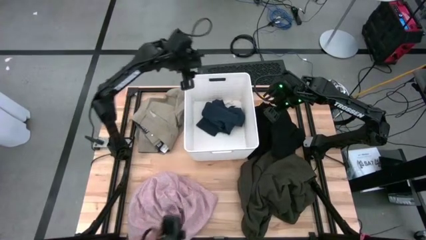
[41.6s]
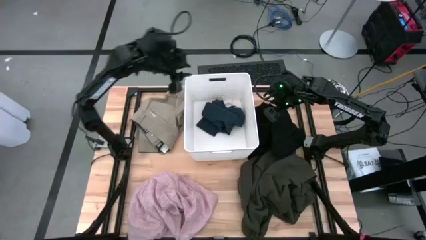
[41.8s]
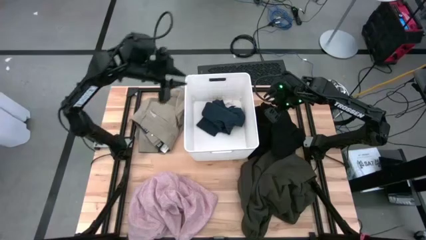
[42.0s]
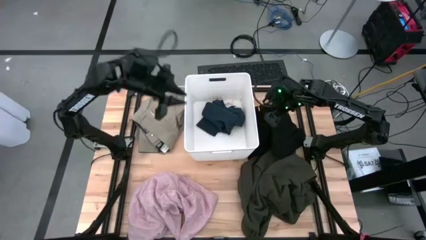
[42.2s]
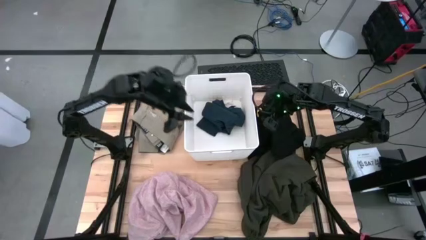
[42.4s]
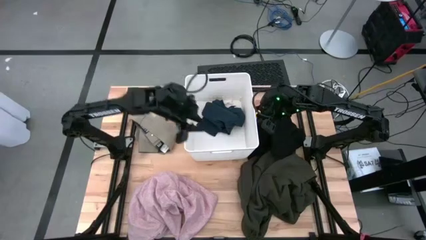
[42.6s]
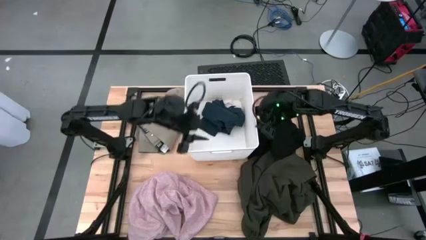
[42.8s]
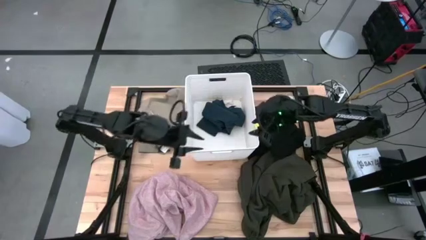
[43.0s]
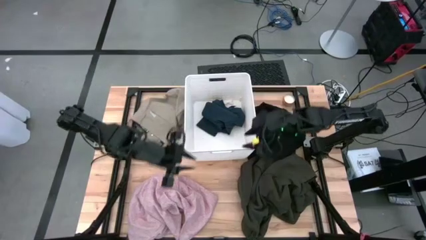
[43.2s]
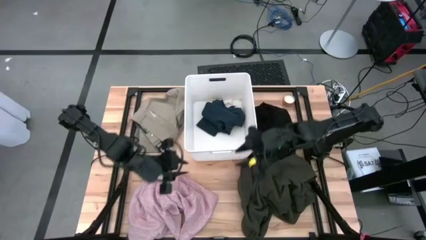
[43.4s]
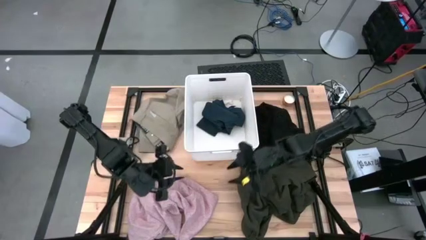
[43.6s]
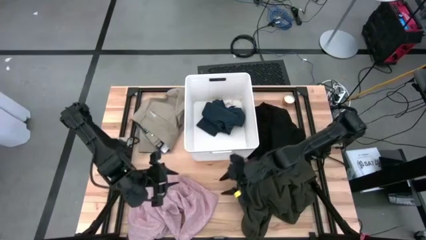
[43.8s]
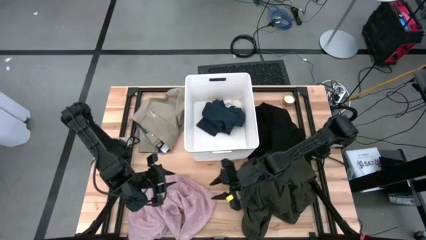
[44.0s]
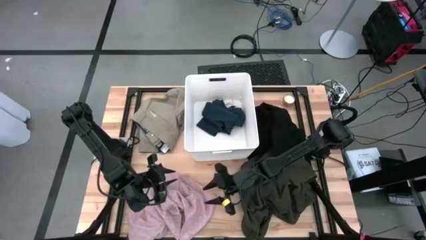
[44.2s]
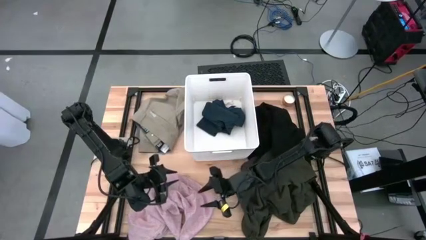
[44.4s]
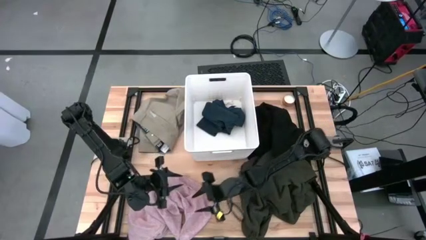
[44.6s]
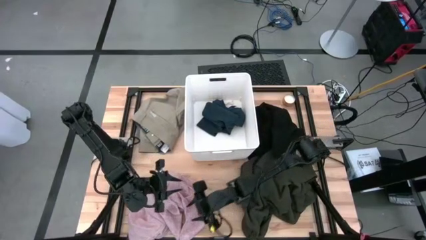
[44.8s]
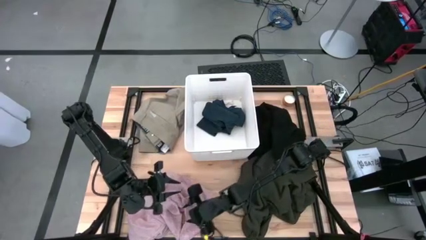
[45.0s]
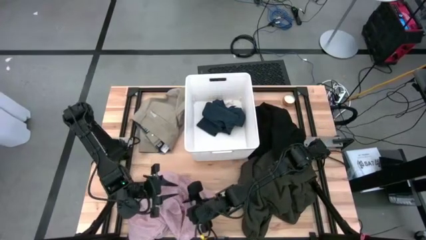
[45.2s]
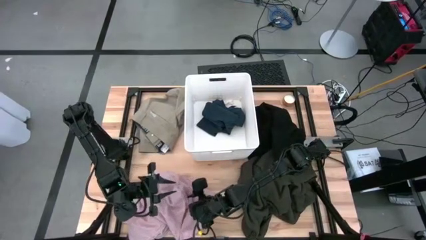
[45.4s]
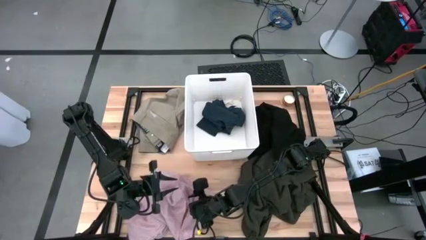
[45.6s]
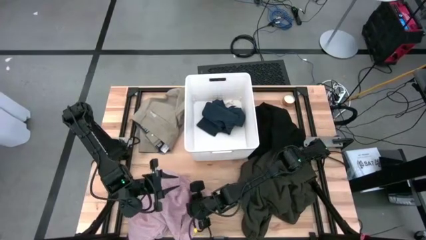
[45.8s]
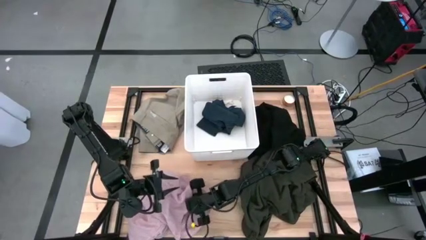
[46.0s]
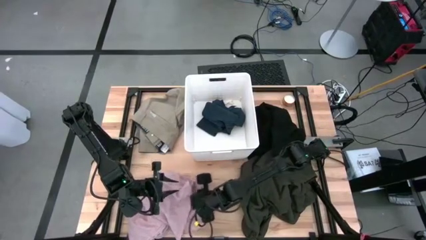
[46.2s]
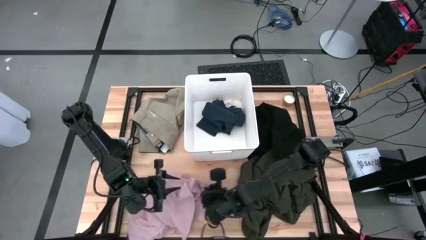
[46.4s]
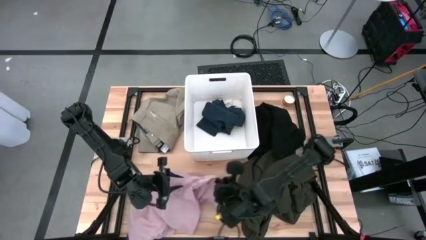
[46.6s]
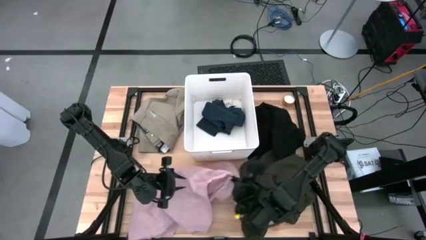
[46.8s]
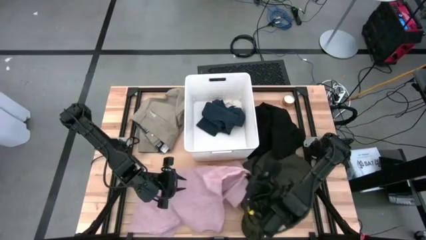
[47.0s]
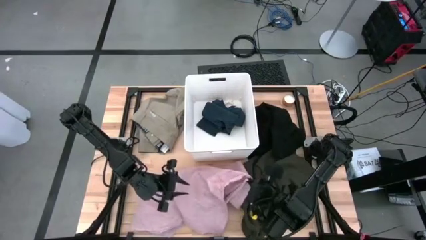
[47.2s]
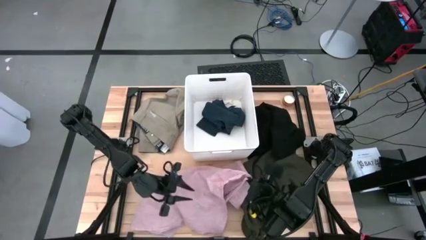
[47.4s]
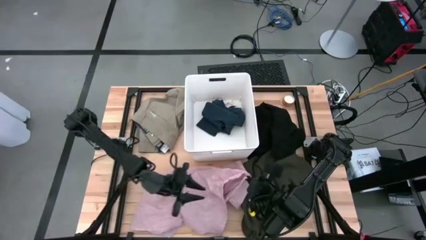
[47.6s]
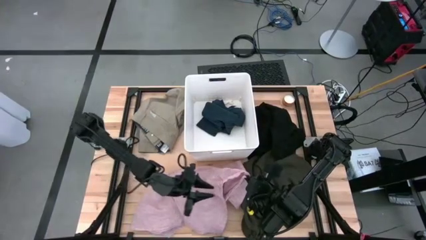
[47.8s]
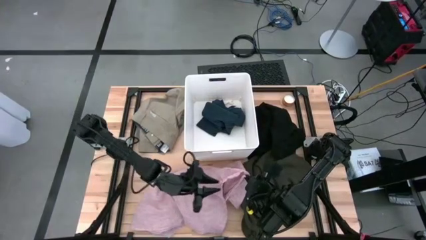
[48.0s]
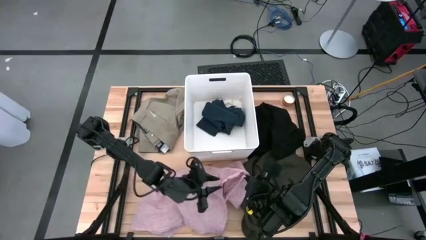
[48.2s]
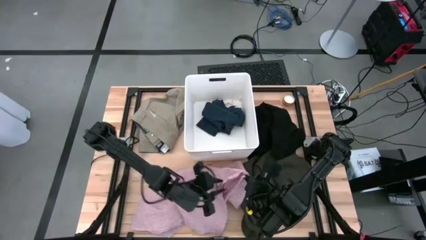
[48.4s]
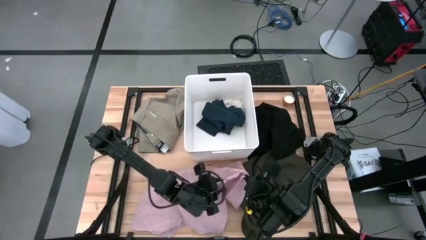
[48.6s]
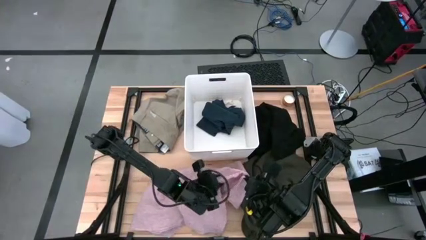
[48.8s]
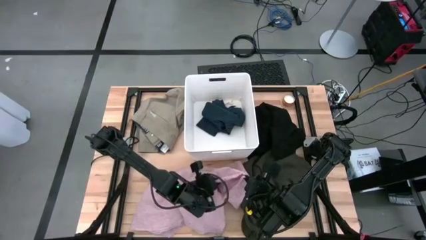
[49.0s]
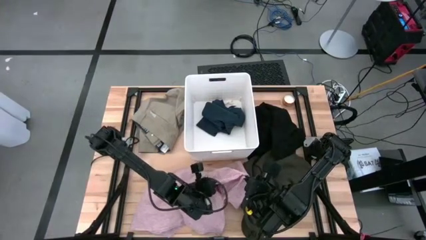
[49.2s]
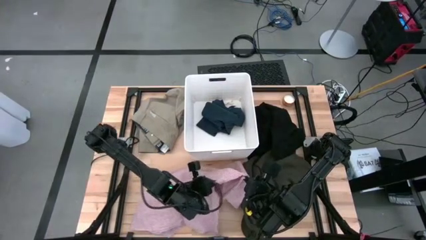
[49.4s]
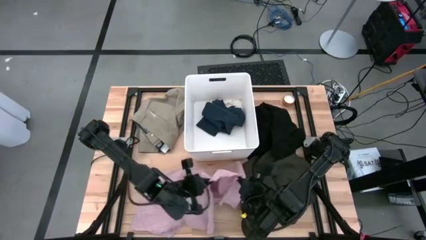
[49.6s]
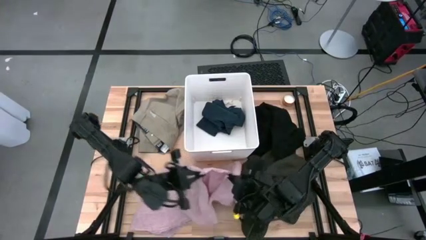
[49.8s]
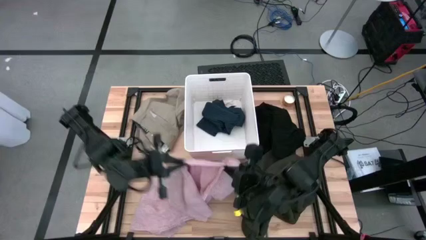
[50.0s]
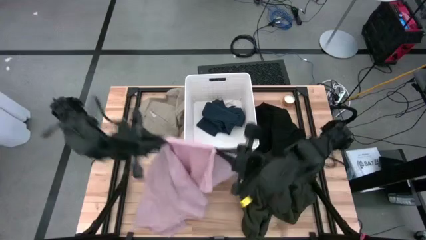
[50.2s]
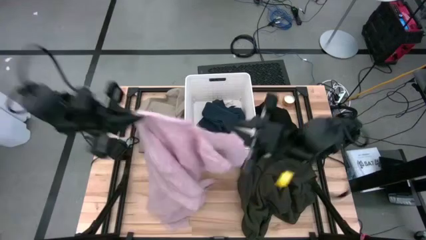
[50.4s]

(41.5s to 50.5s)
Task: Sort clothes
Put the pink polo shirt into the white laundry bin

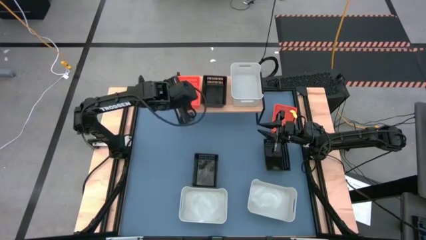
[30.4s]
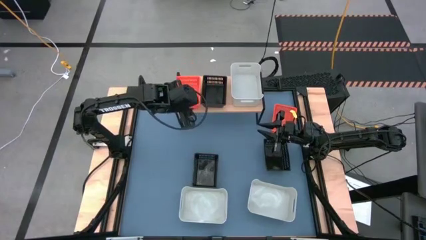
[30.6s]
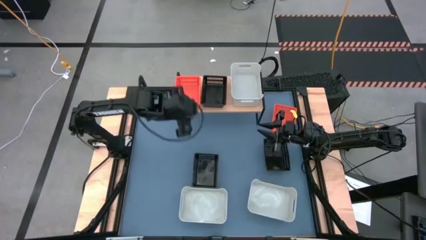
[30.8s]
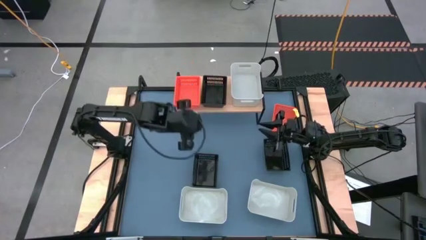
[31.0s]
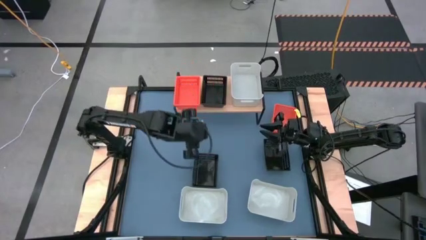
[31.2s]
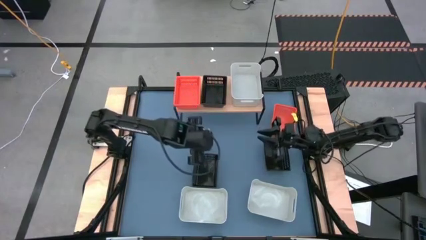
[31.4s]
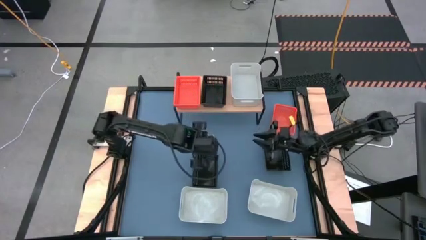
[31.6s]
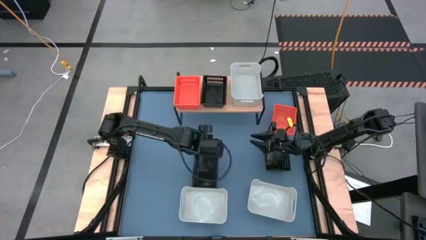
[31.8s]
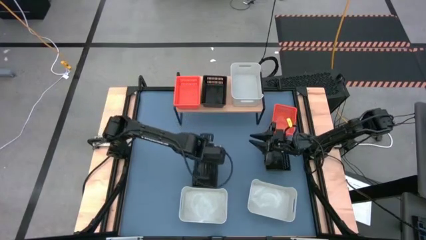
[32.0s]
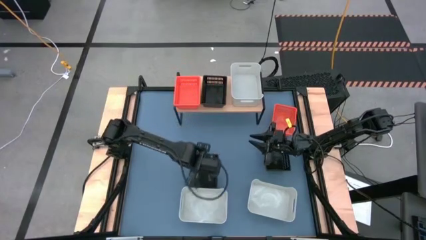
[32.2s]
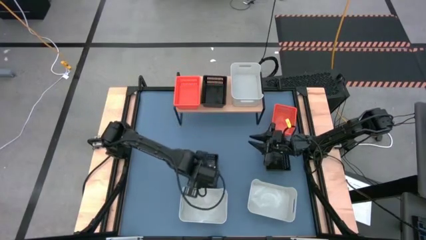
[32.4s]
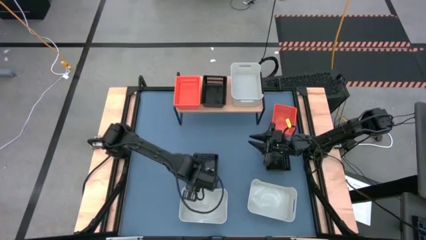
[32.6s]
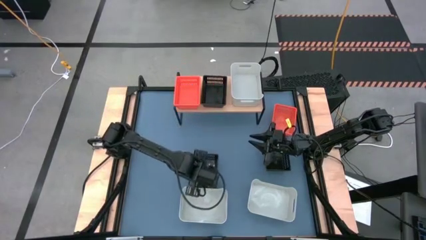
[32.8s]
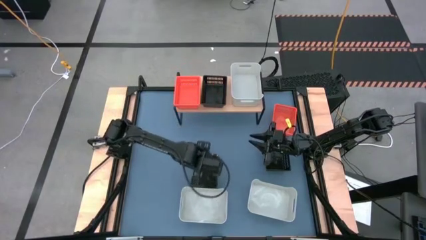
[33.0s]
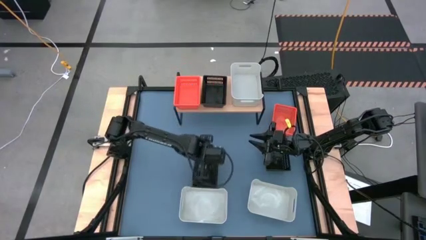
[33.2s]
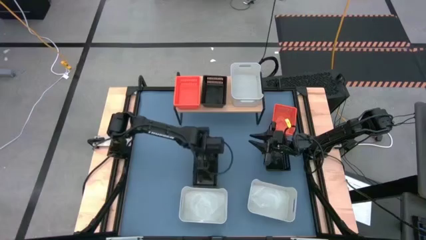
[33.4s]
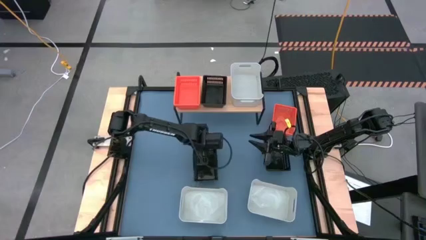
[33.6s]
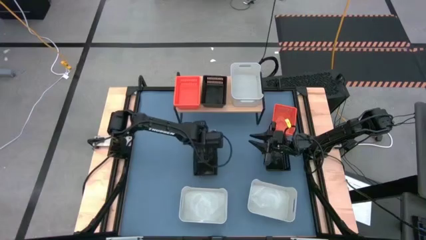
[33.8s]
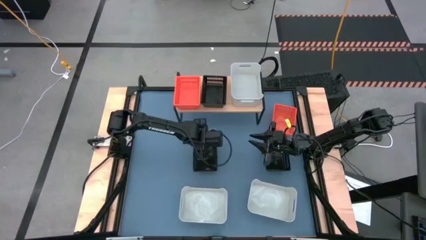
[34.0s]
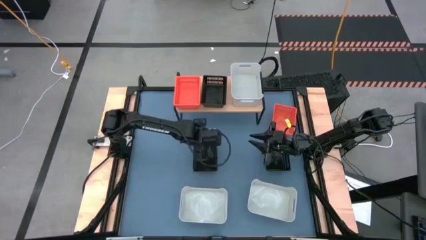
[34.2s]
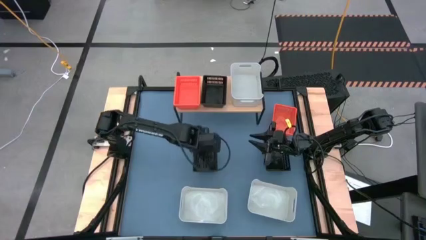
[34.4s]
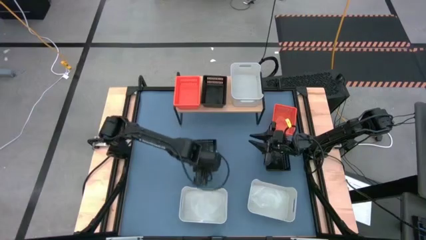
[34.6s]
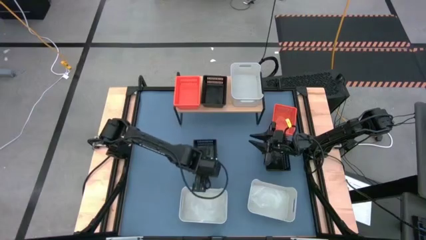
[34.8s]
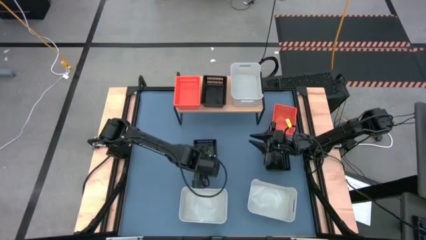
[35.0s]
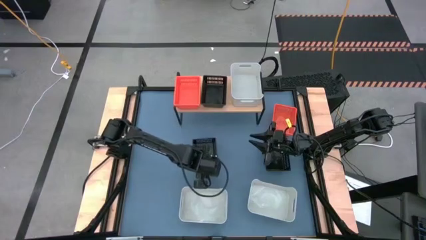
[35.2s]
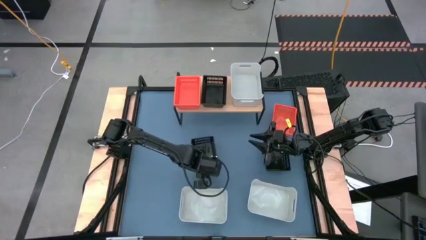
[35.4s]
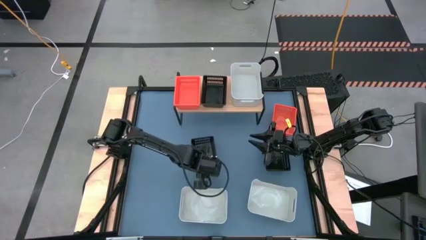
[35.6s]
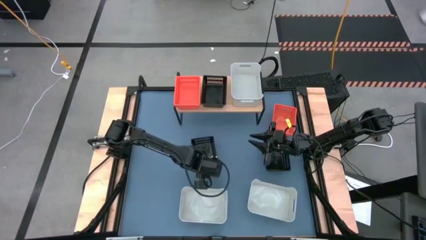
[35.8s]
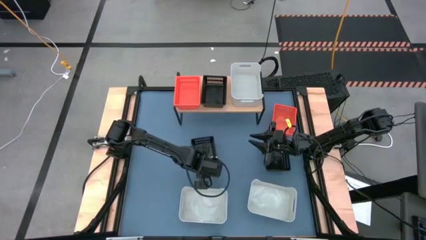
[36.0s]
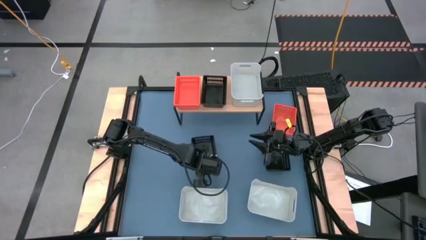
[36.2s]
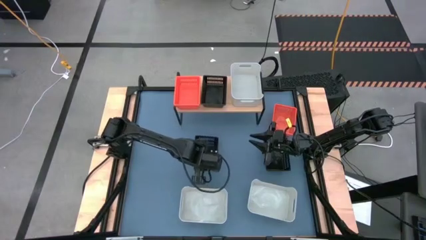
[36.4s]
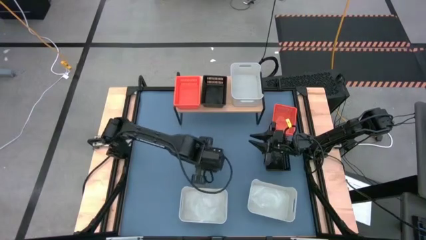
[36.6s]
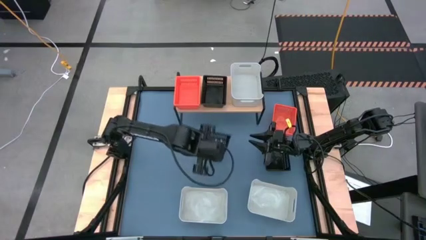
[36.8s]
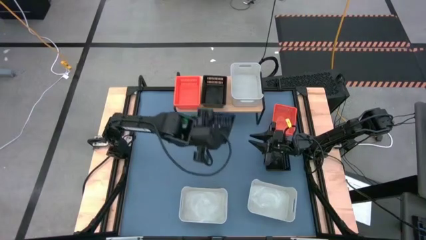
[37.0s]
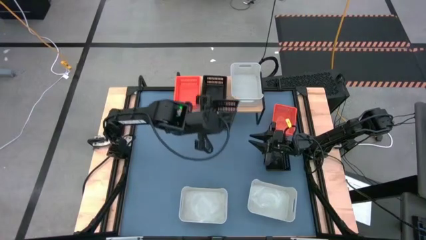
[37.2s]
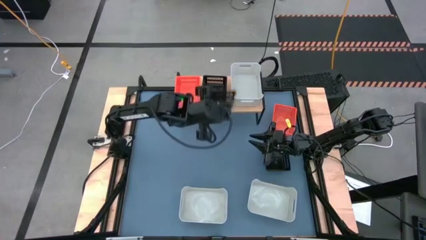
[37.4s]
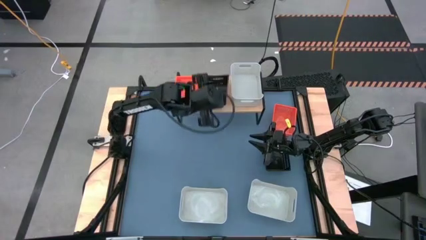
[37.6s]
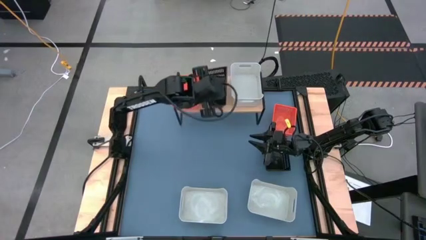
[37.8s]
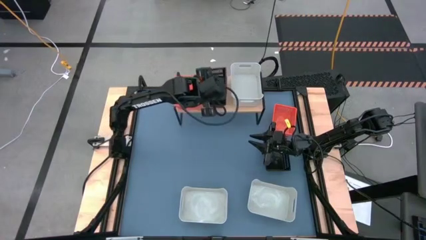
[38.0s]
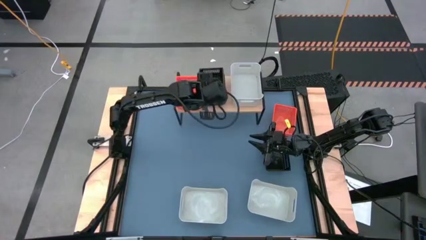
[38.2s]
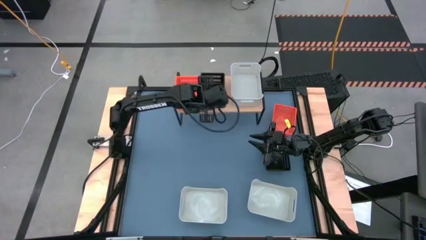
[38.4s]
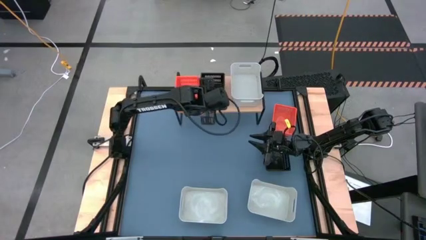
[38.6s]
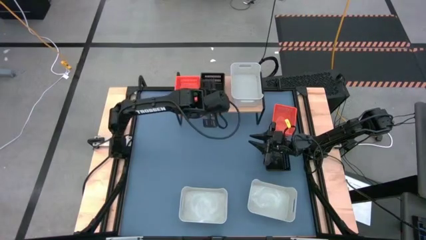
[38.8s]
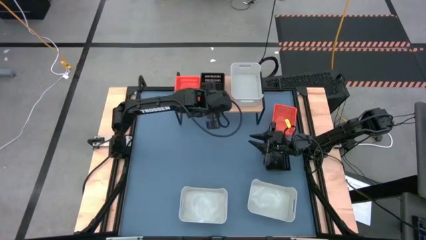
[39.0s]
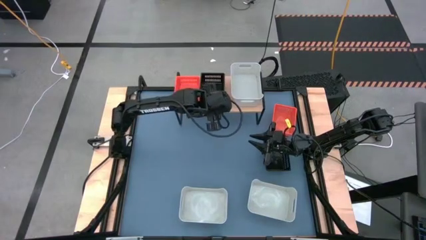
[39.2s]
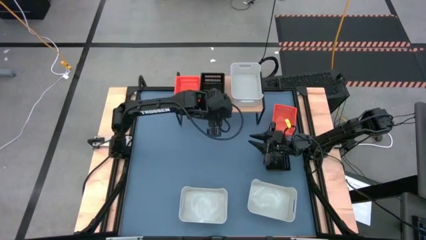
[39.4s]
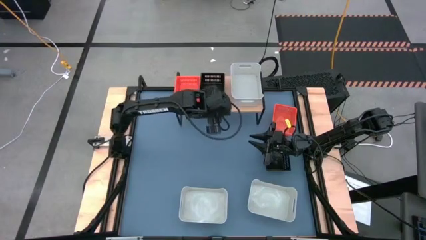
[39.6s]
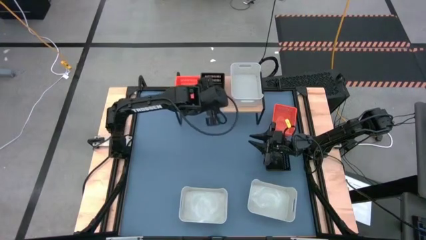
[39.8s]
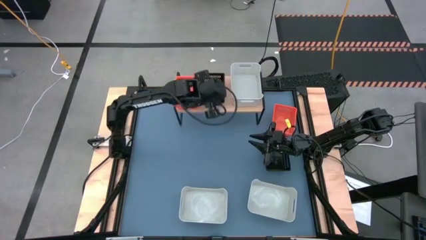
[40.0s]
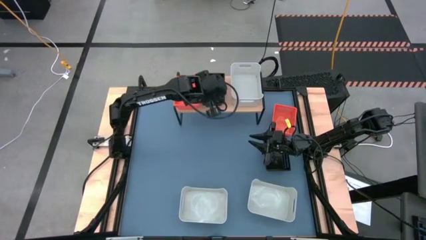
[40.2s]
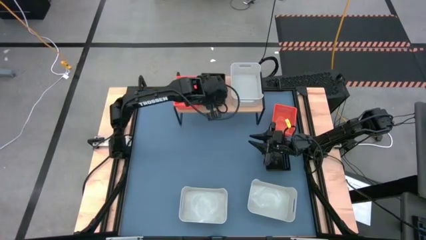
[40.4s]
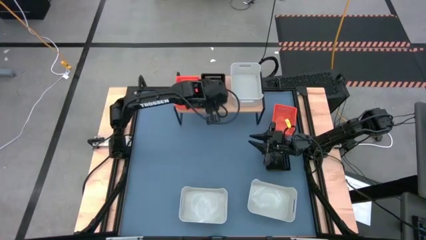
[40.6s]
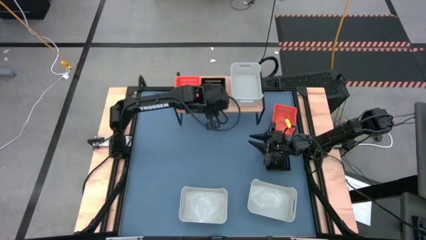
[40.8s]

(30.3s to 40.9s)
Task: Stack baskets on shelf by color
Stack the left black bin on top of the other black bin on the shelf
